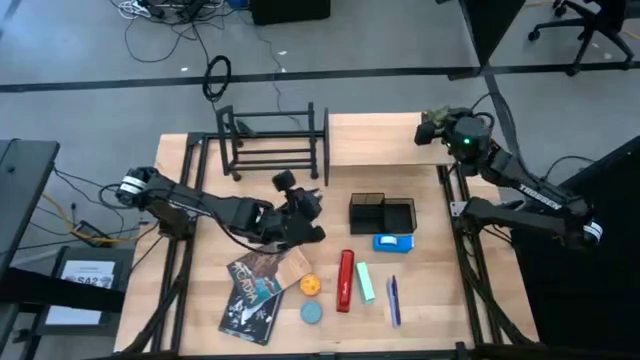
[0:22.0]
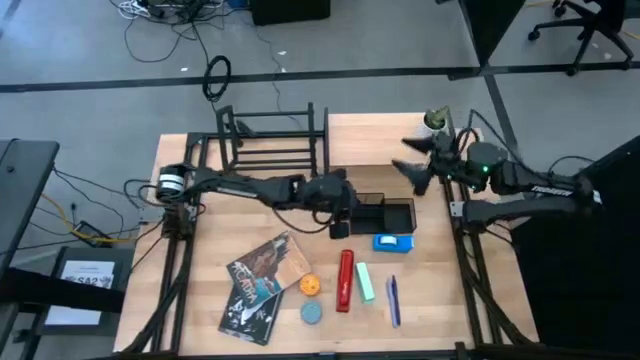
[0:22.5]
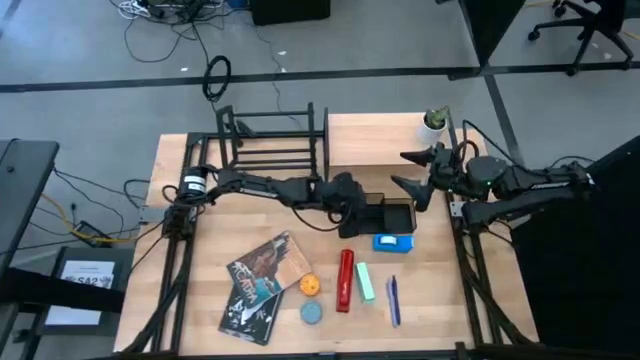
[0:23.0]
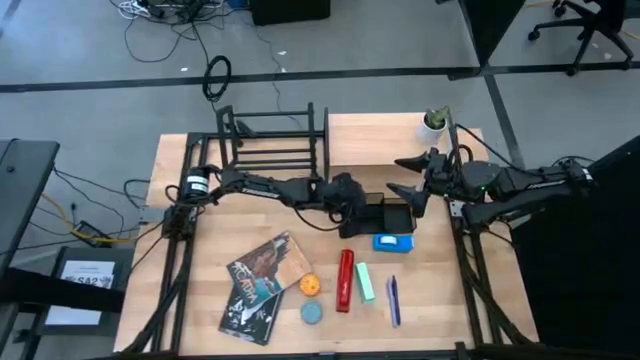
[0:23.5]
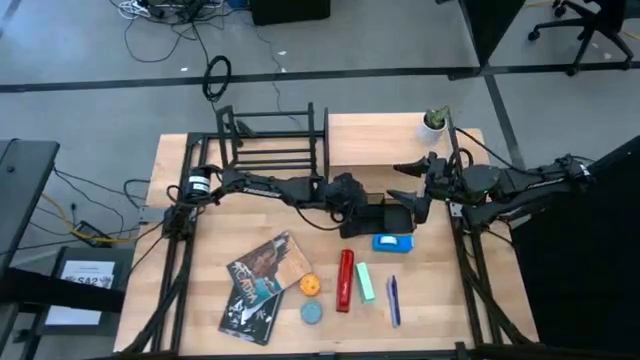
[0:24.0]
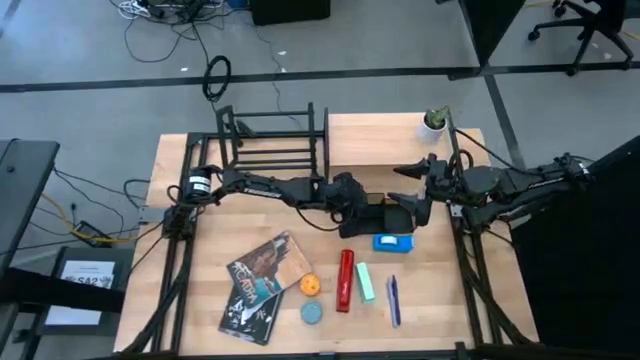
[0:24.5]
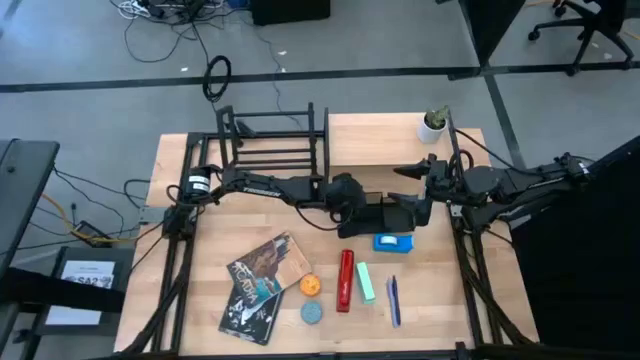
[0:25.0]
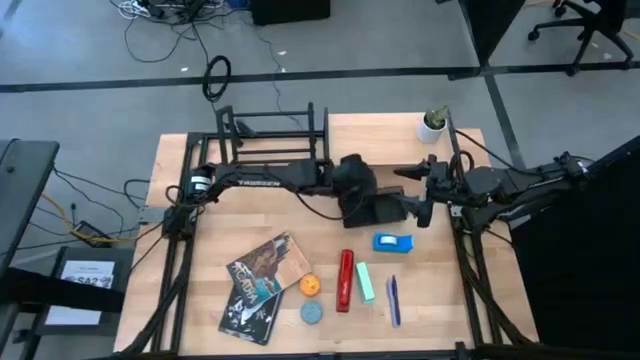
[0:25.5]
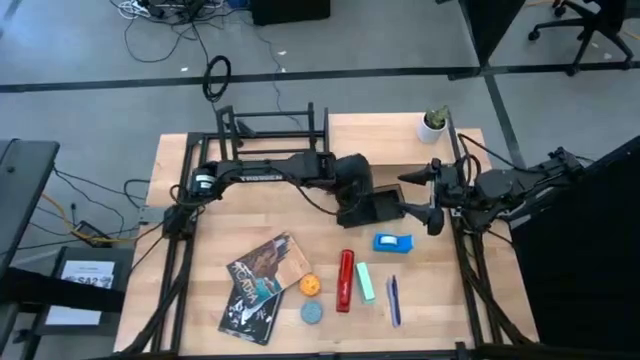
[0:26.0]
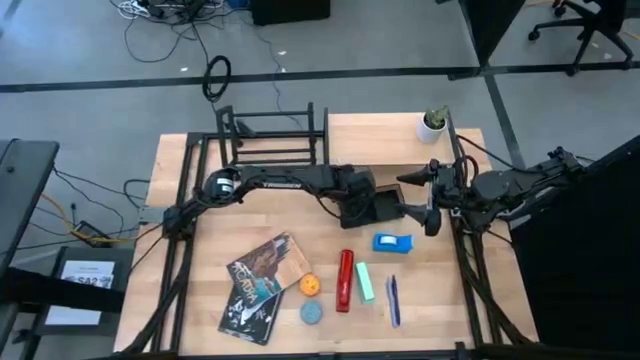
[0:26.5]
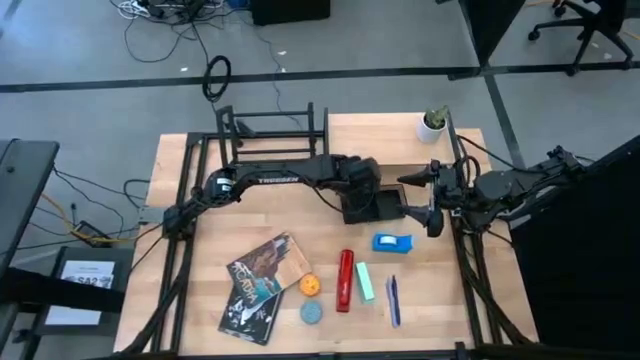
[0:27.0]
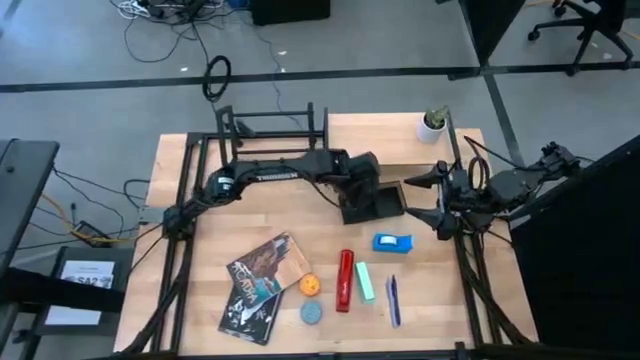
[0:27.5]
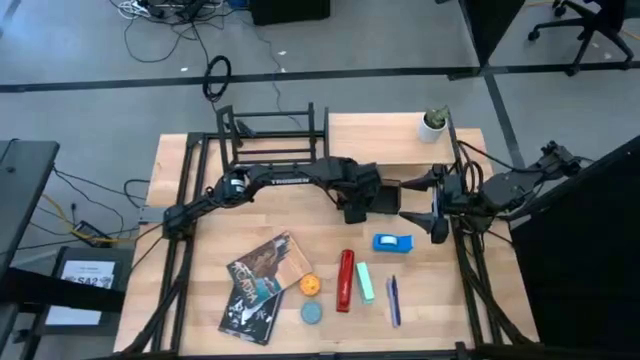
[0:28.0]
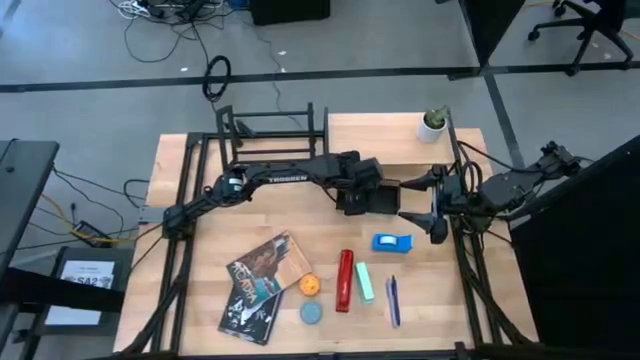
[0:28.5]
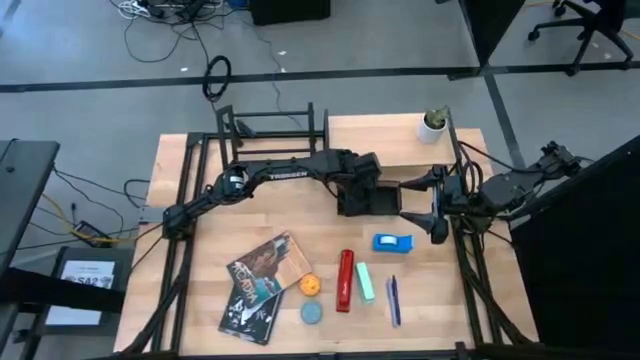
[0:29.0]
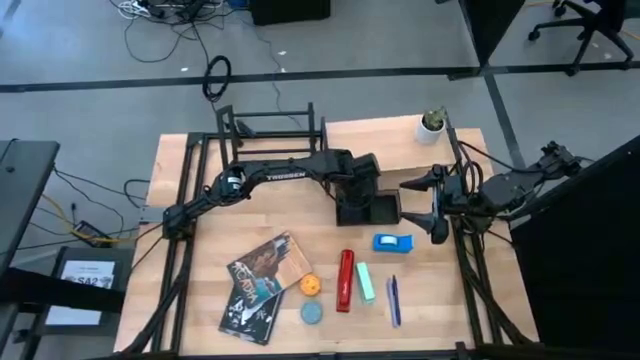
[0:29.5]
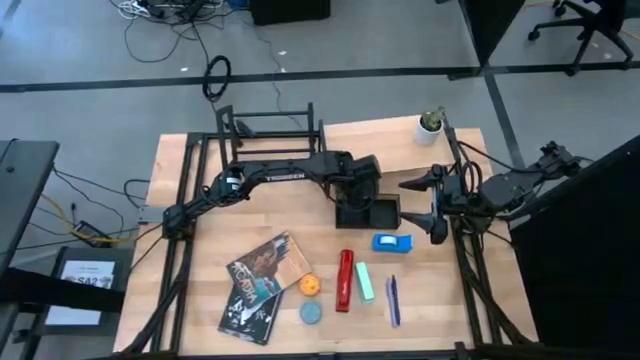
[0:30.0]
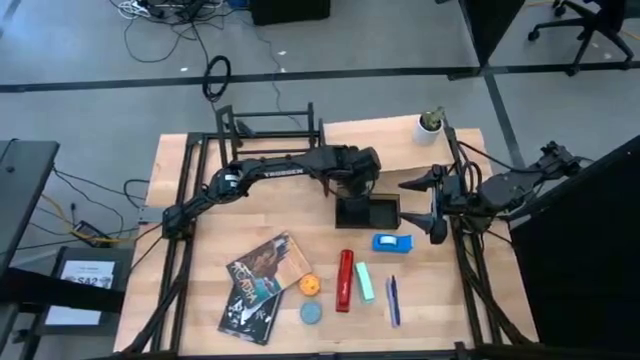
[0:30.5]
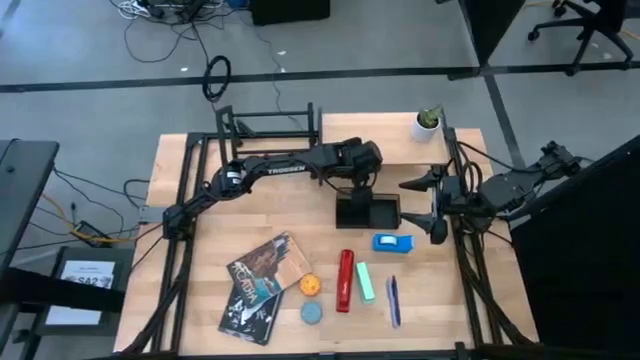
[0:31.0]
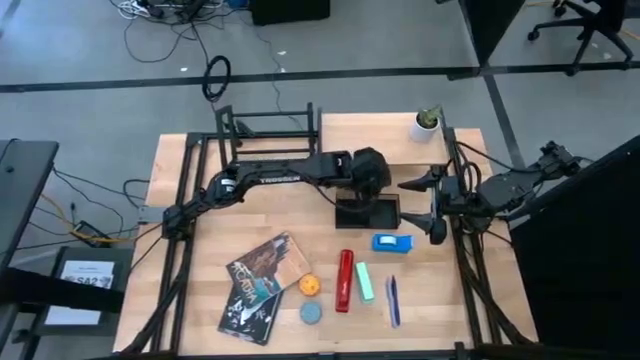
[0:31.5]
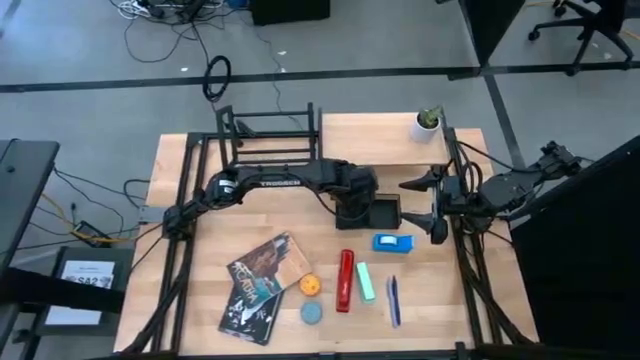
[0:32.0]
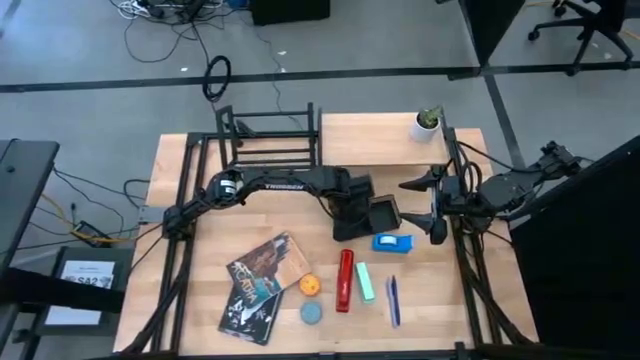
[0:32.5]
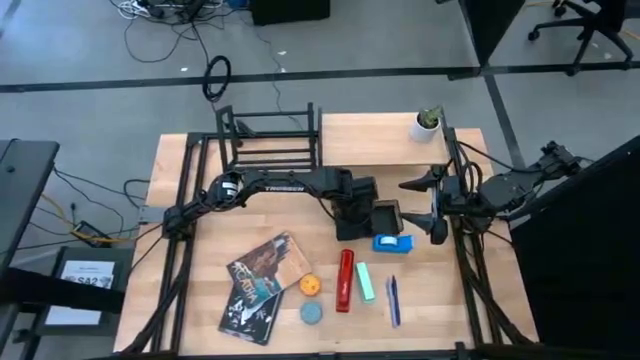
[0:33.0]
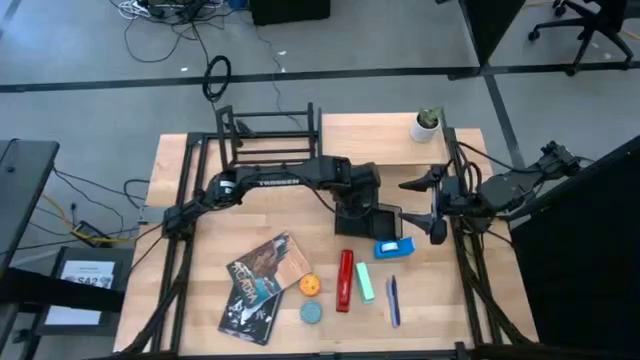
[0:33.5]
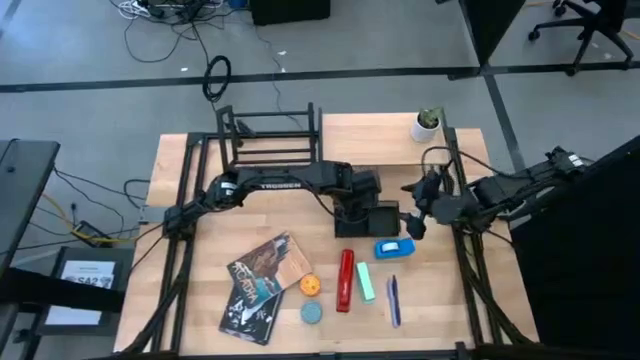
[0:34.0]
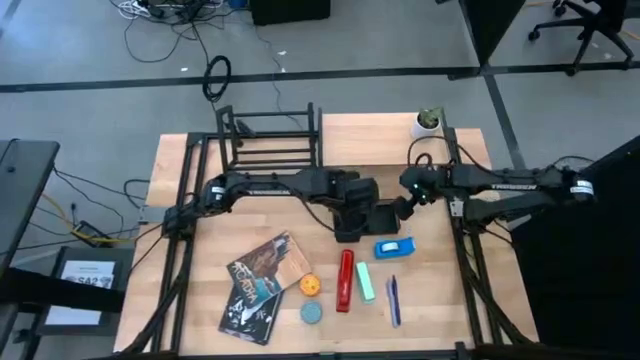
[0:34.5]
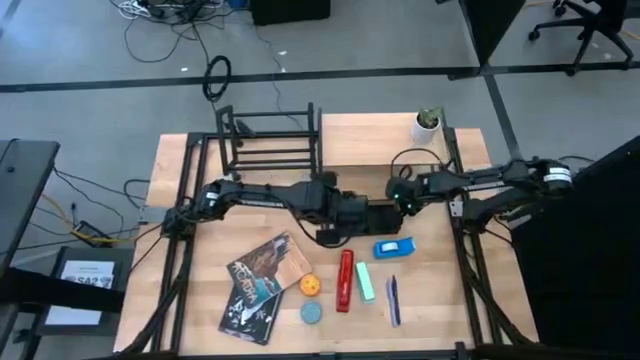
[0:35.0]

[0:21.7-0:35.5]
Task: Stock shelves
Put the pen holder on the shelf

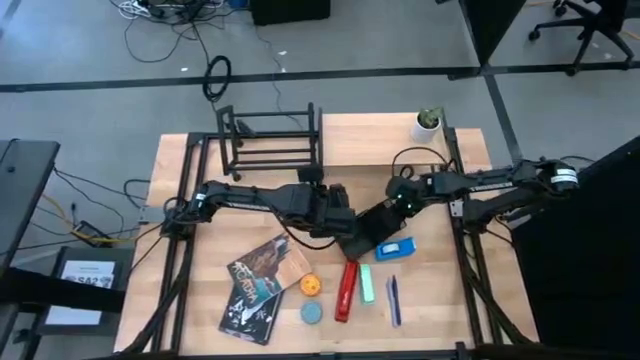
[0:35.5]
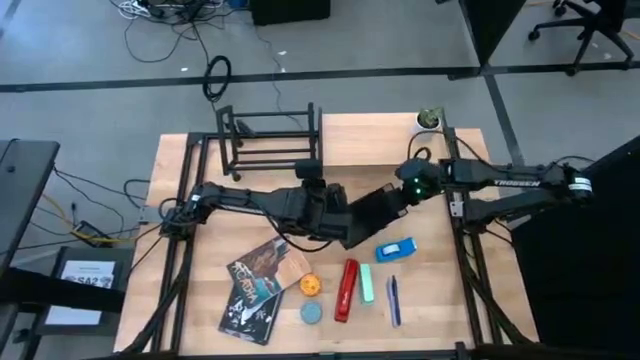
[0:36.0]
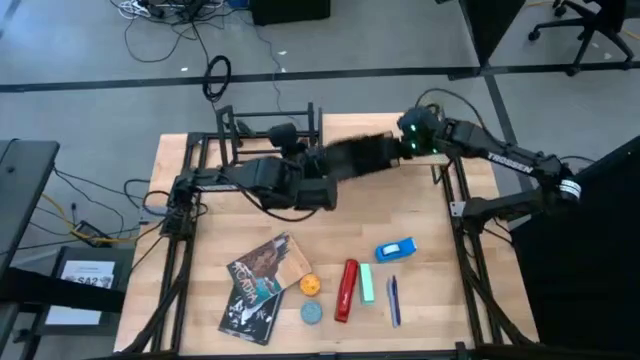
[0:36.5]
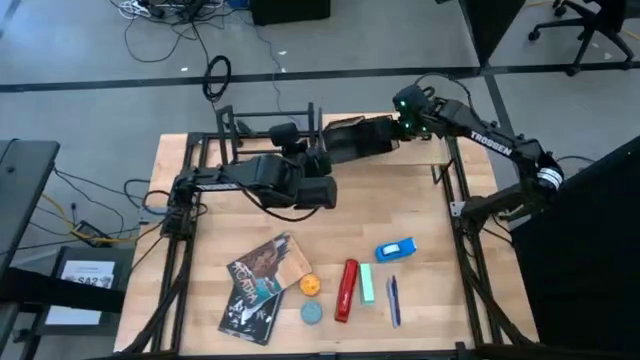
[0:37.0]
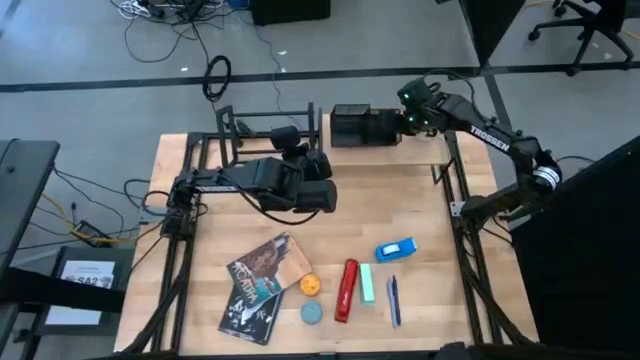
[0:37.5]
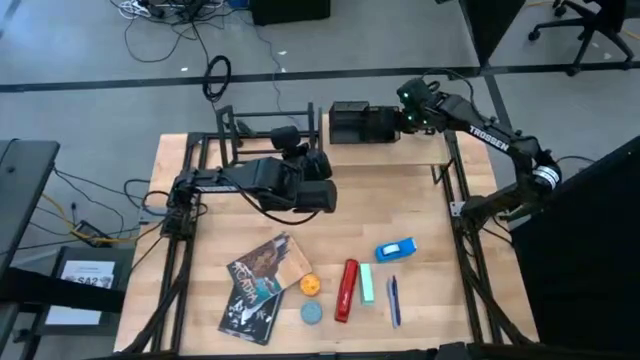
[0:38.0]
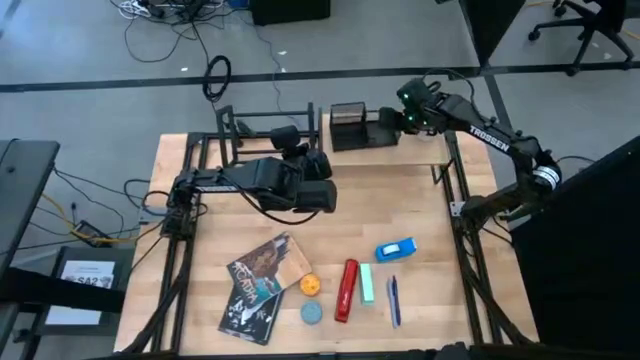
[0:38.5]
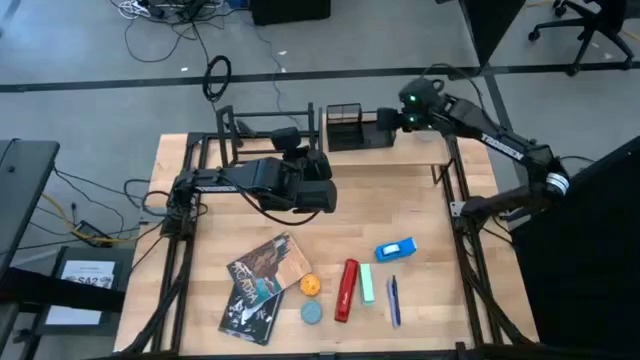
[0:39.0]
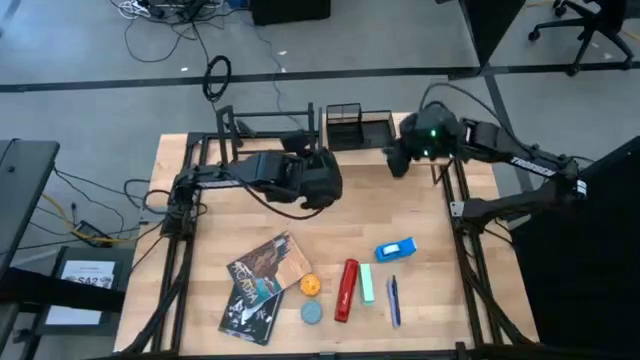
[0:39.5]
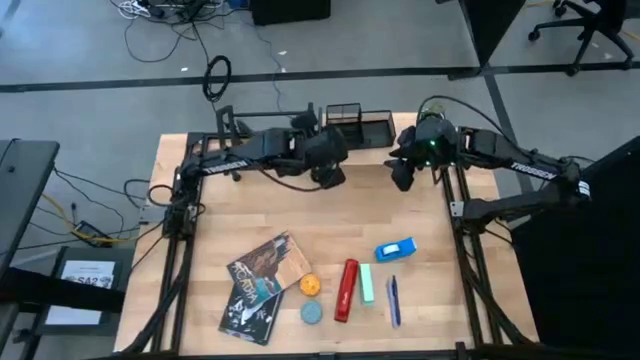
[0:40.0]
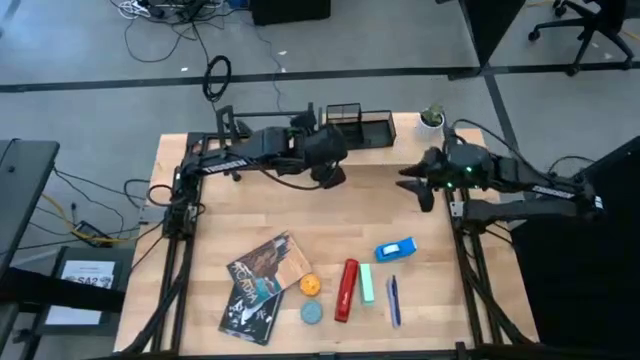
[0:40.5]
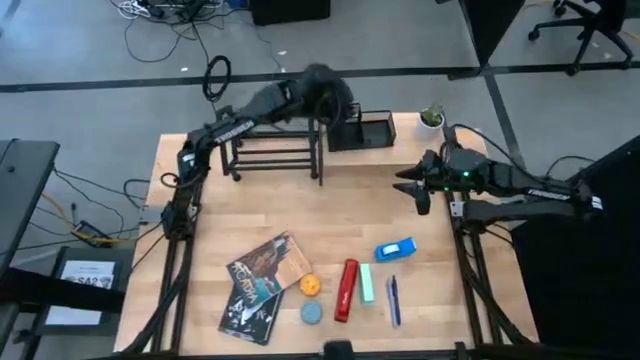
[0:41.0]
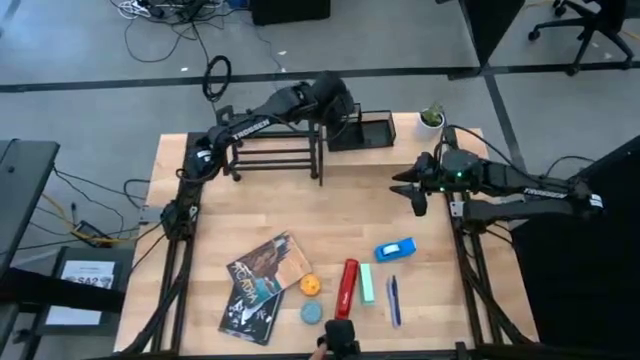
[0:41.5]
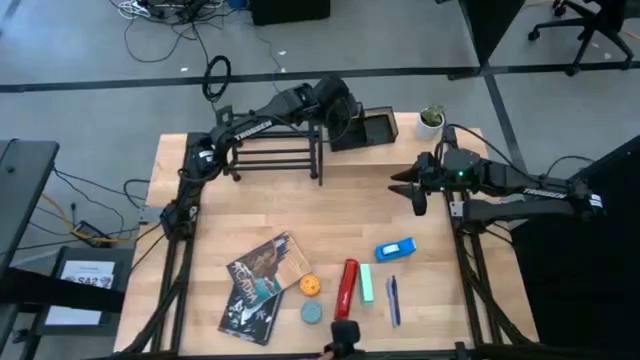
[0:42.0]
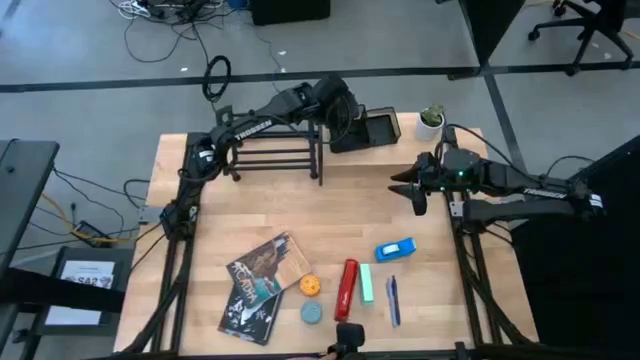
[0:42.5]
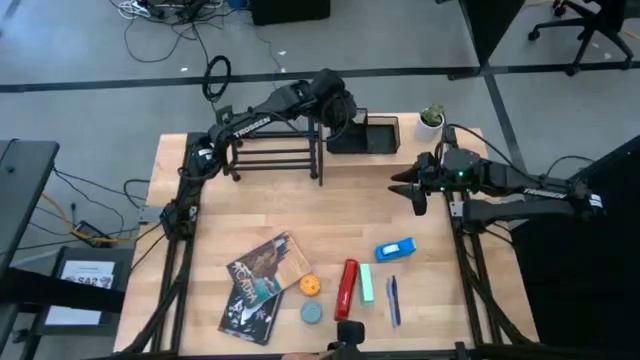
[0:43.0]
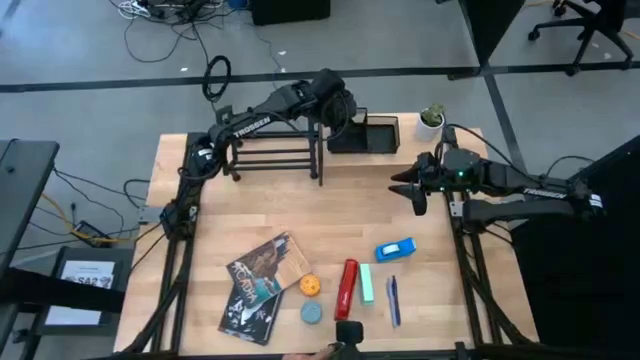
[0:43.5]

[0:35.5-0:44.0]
Put the pen holder on the shelf
